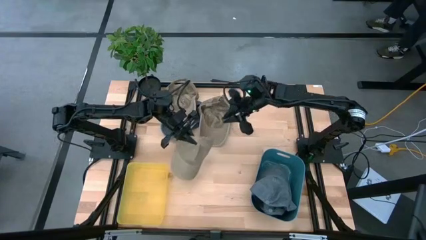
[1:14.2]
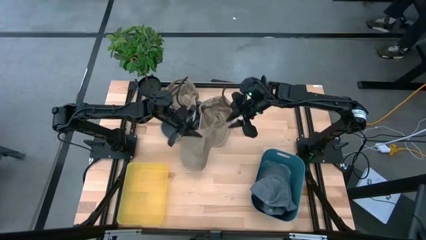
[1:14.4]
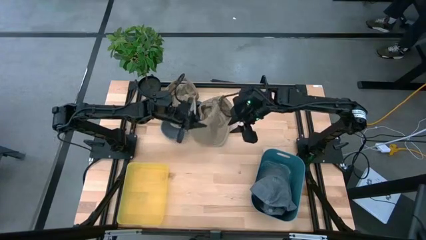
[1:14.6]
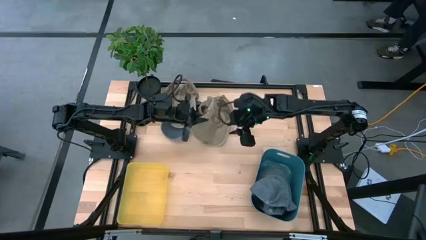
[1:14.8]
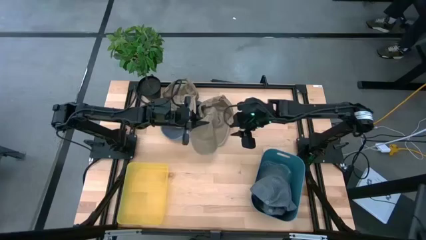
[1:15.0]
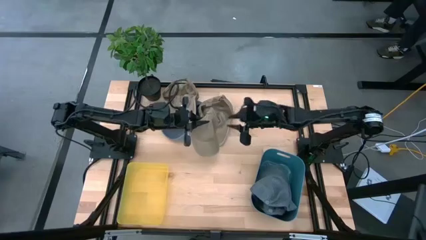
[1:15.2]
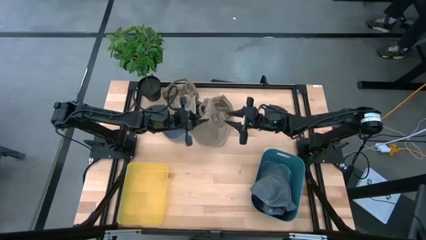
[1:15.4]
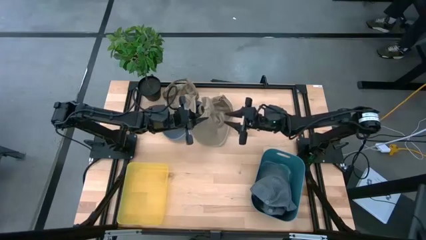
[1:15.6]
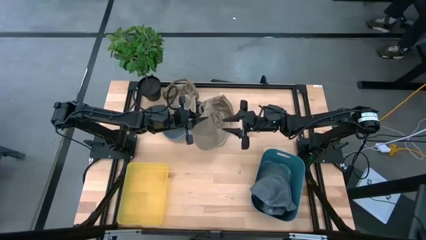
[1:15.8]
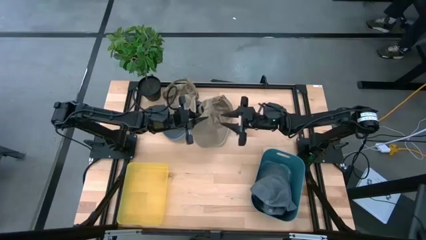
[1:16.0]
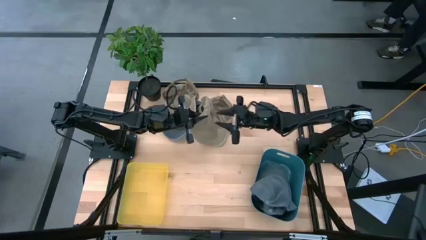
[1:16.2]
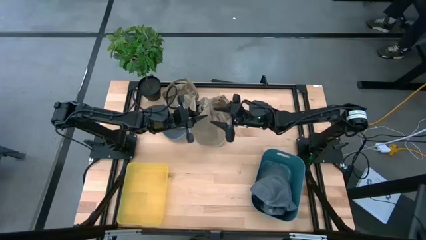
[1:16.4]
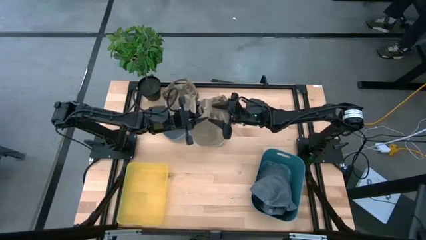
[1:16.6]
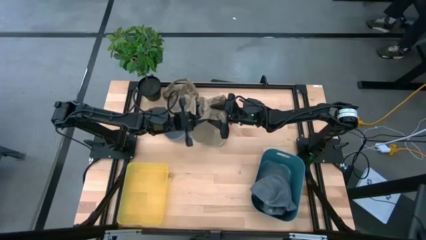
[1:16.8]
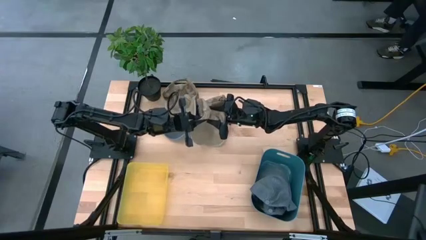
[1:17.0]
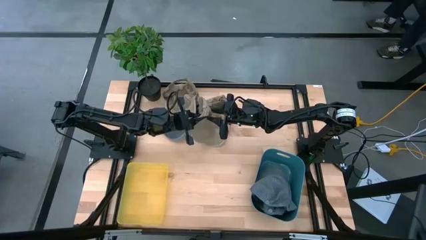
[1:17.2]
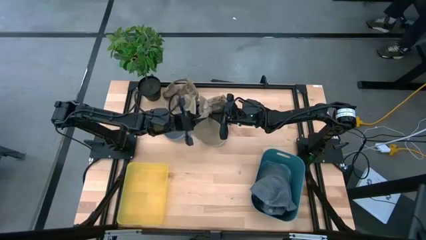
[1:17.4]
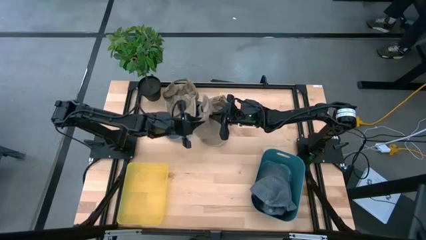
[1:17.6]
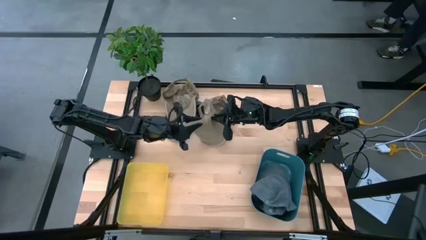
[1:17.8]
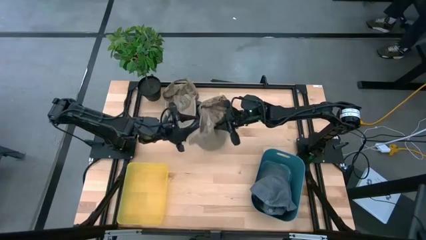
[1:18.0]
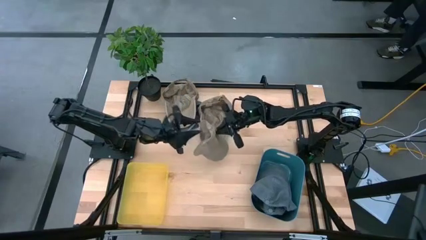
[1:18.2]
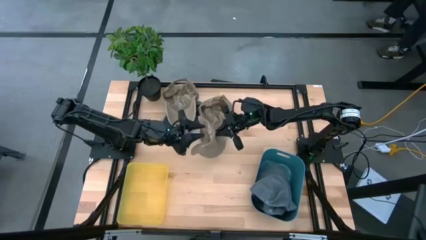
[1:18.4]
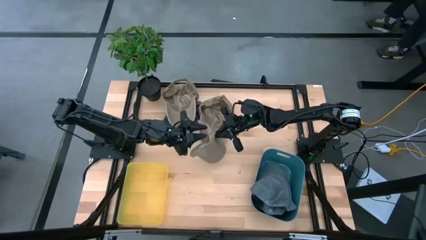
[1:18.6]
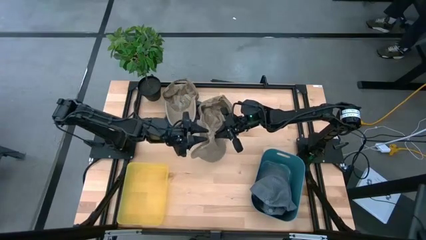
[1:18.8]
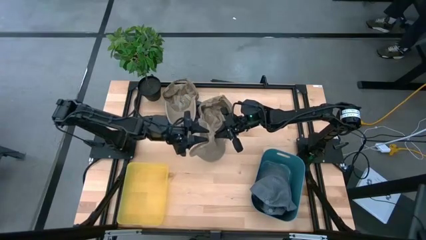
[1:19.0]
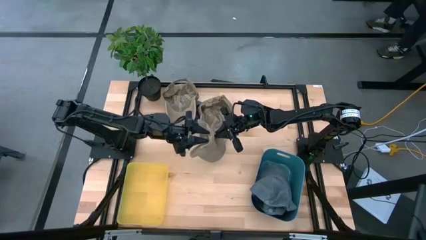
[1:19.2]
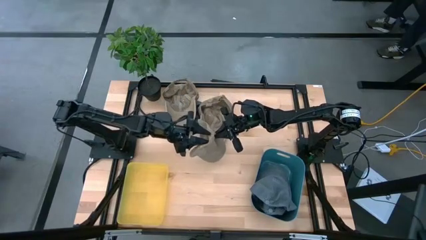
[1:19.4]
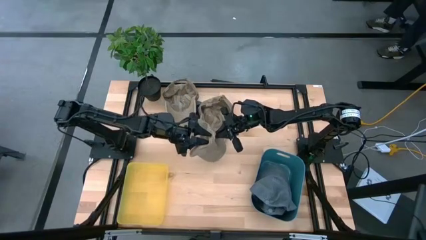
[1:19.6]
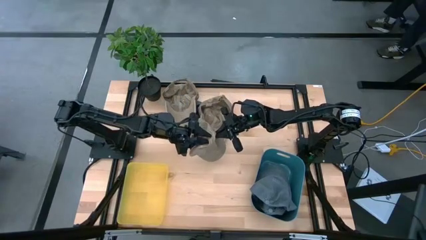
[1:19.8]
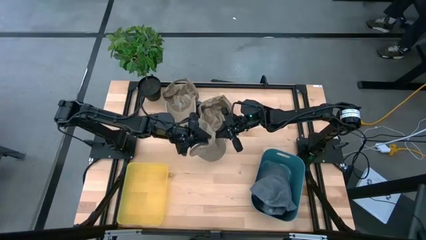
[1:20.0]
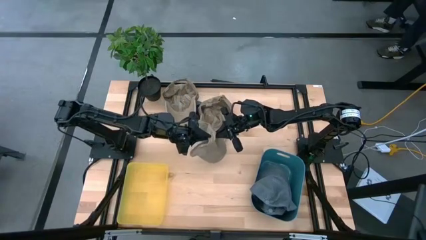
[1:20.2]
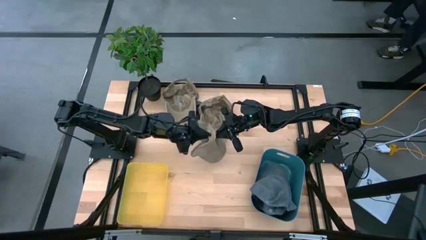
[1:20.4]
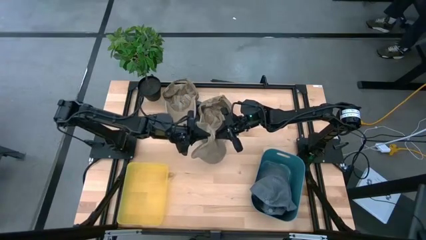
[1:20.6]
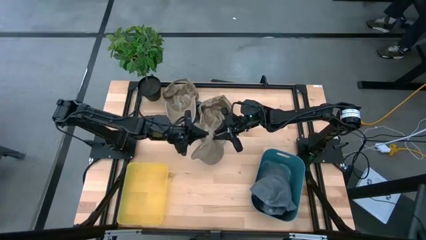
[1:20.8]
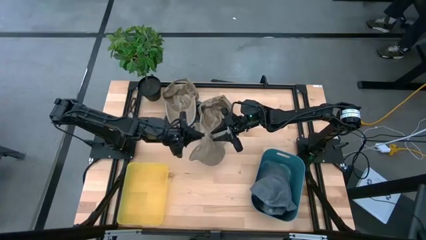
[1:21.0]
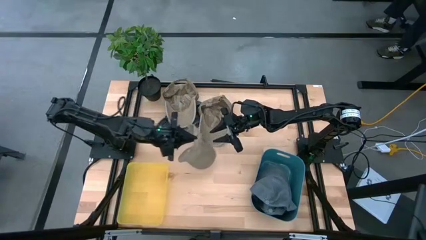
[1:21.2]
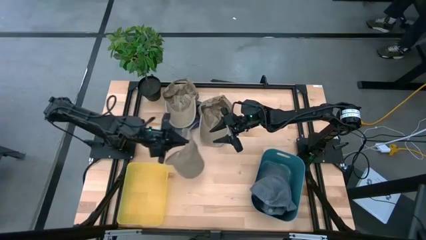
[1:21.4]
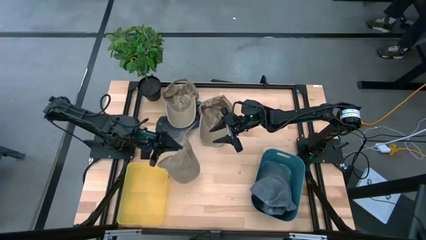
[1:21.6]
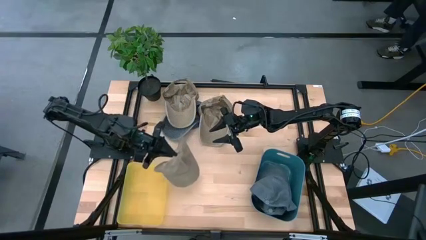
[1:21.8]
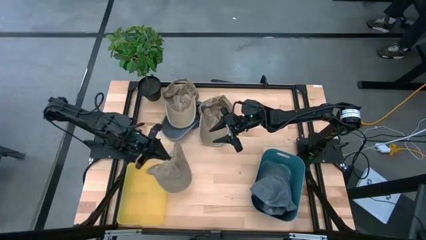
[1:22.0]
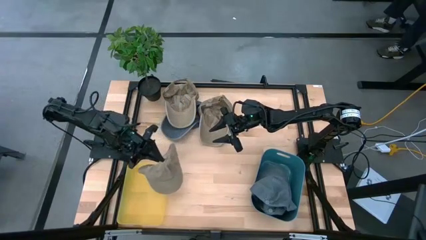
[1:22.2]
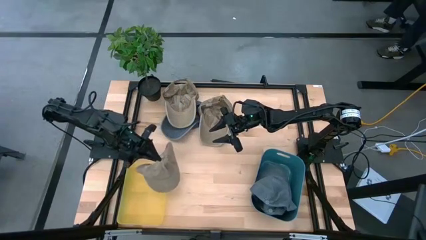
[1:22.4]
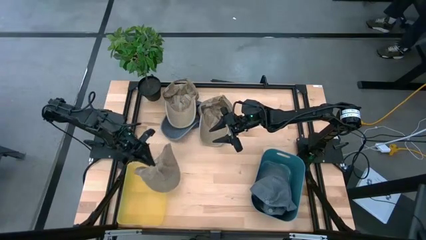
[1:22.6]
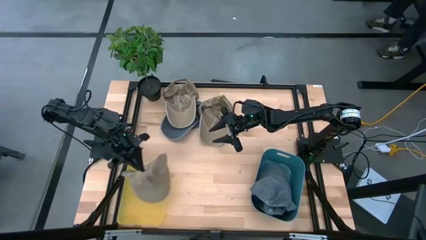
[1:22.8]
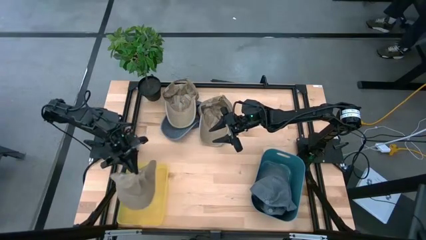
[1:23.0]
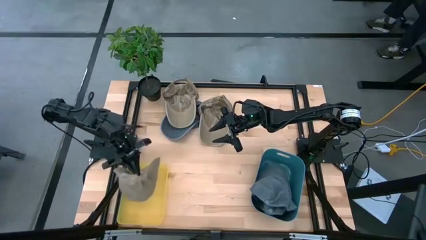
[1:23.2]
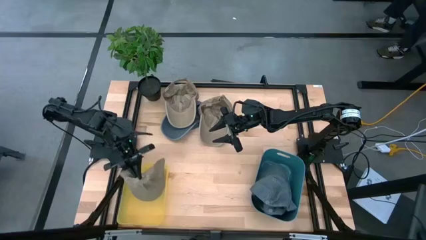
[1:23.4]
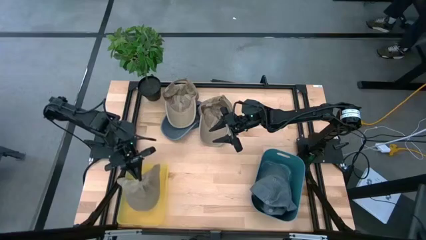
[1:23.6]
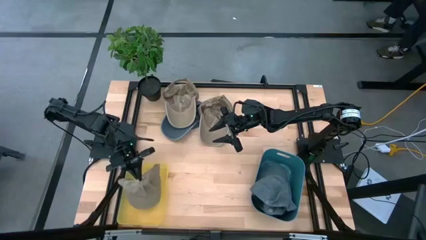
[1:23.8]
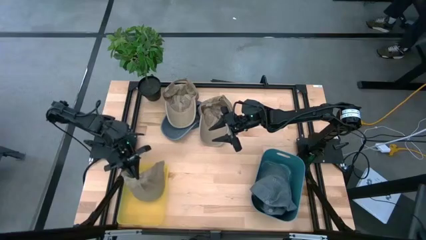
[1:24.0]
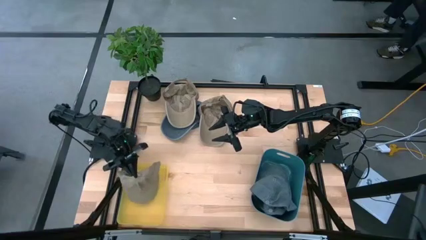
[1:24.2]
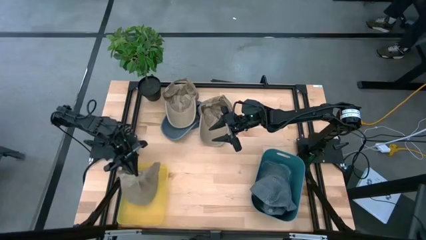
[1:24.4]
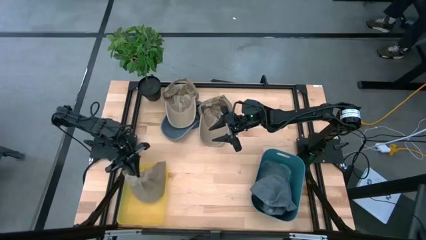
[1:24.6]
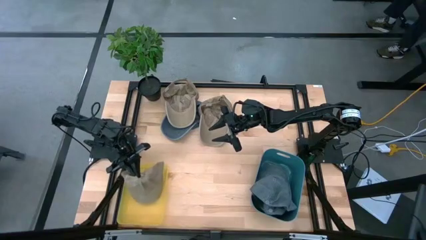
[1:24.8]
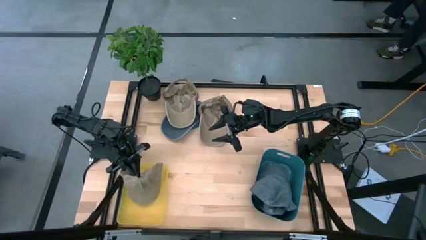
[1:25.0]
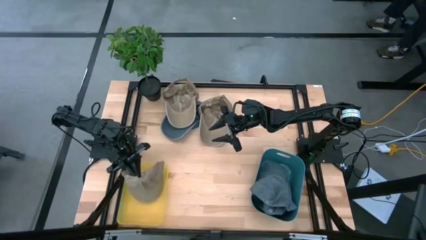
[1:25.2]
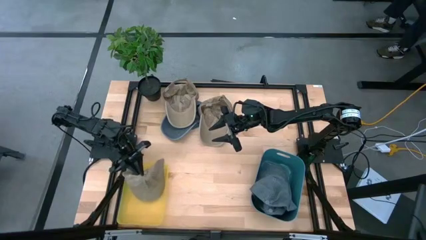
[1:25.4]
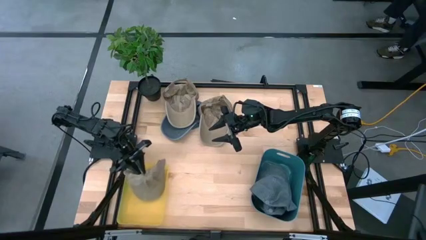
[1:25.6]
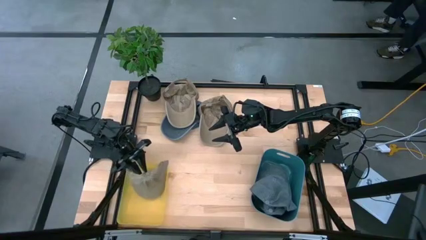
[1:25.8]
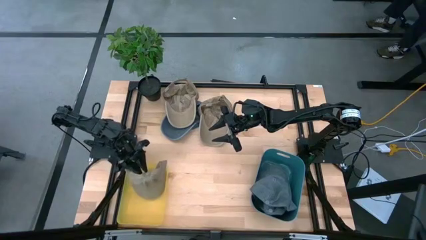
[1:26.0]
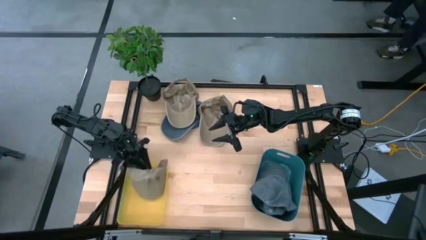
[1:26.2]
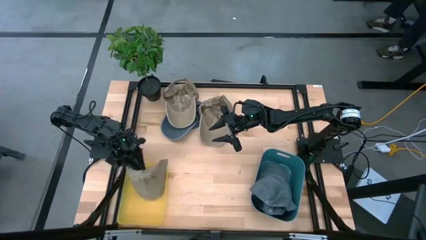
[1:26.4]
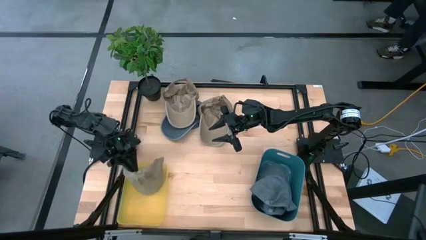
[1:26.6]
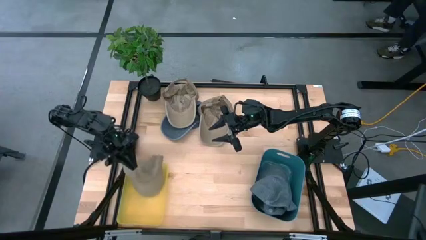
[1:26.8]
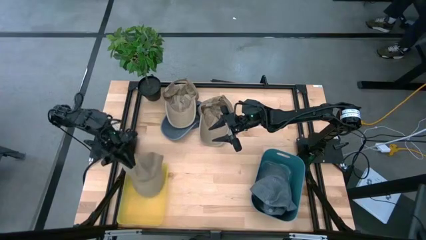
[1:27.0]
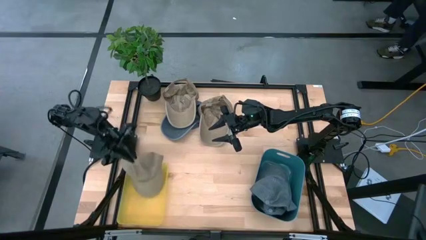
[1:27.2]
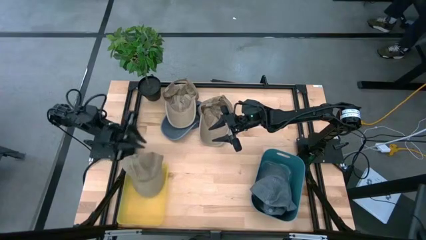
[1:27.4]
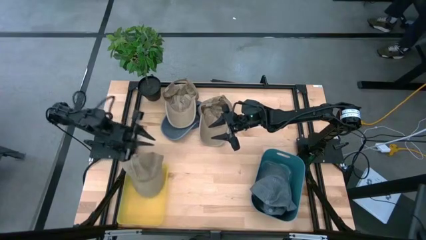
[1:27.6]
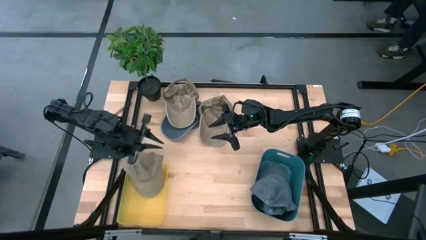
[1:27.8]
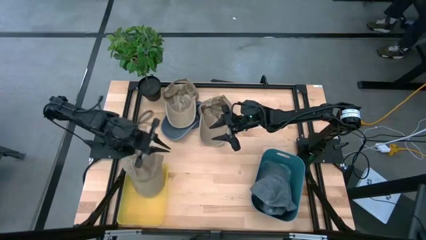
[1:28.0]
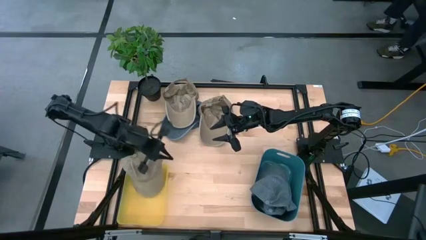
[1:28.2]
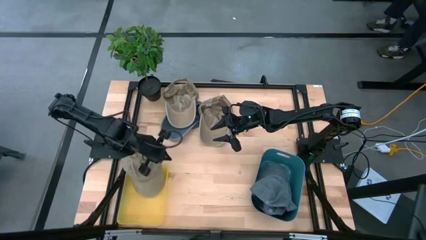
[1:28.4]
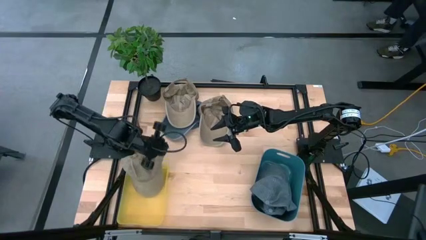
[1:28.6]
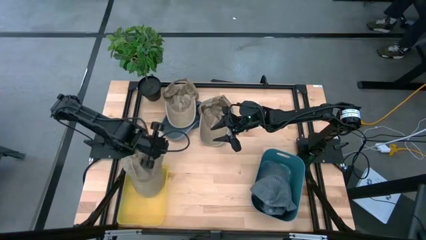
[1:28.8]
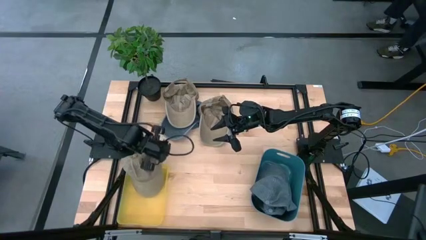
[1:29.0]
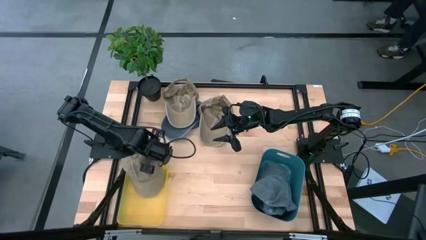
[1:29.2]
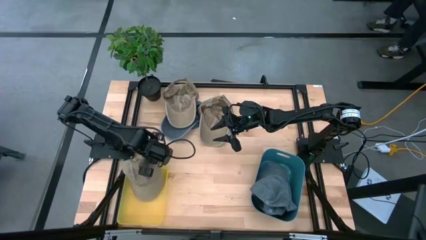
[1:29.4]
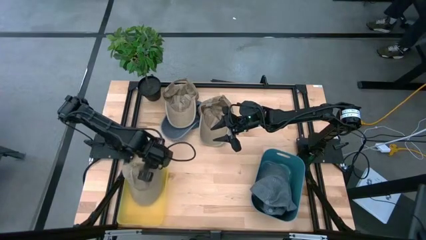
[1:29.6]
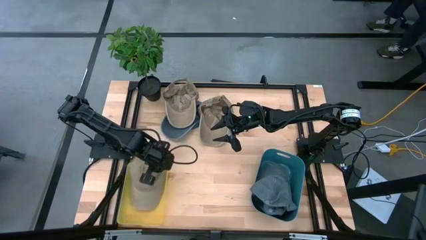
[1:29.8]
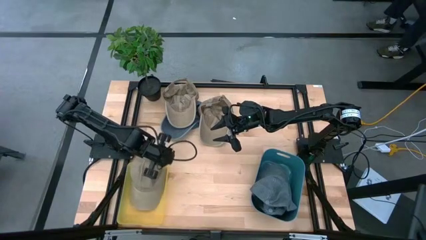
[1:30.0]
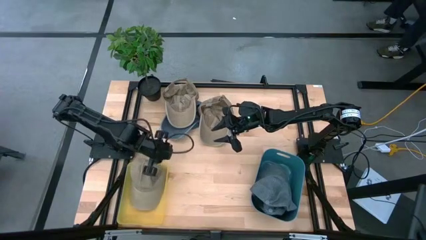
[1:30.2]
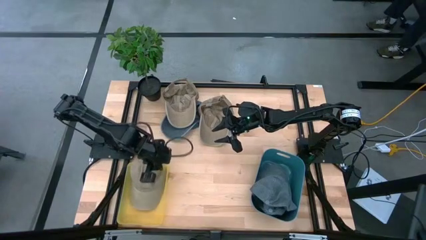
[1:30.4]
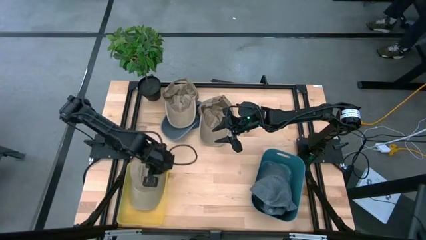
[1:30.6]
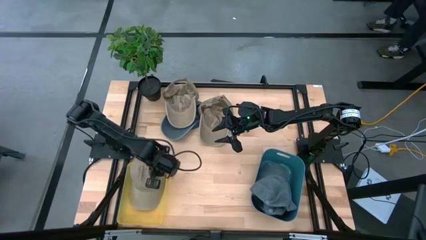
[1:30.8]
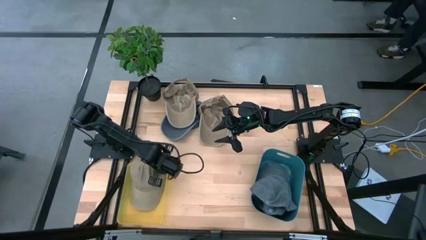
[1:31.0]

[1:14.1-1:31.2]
Task: Pick & Place hat
Put the bottom brown cap into the yellow bin
